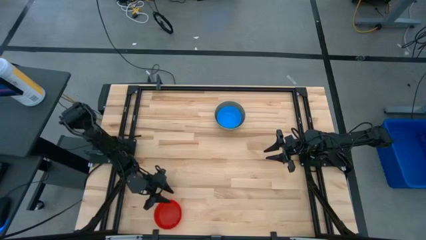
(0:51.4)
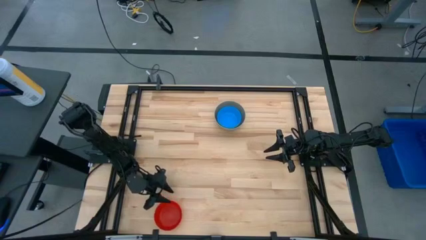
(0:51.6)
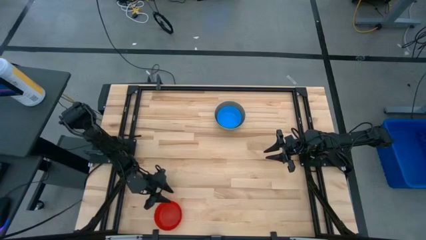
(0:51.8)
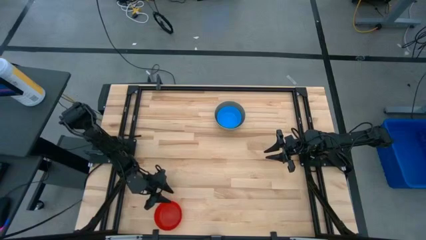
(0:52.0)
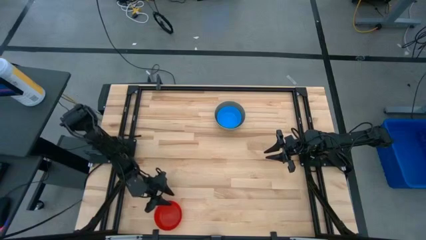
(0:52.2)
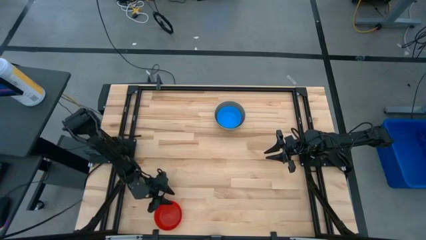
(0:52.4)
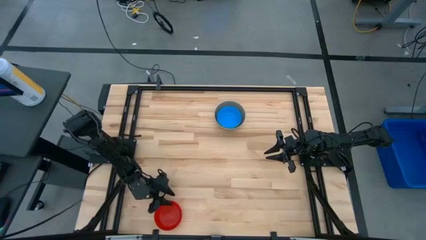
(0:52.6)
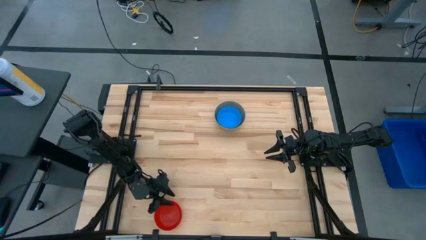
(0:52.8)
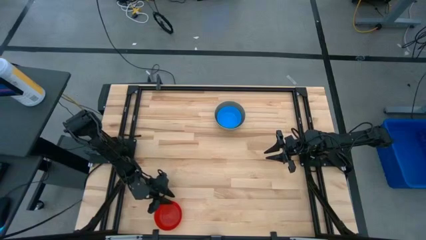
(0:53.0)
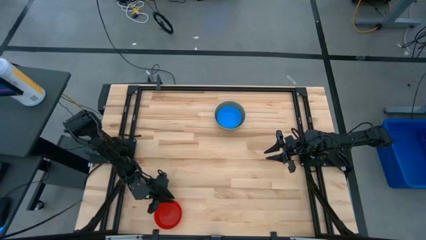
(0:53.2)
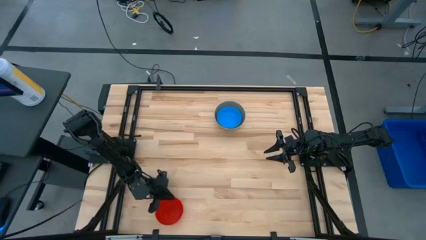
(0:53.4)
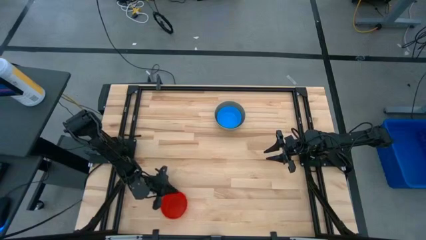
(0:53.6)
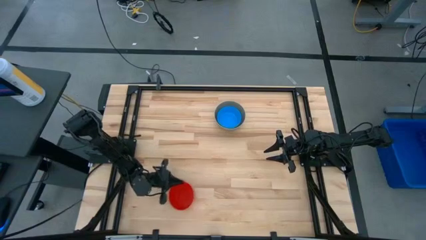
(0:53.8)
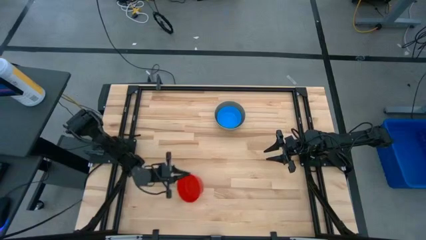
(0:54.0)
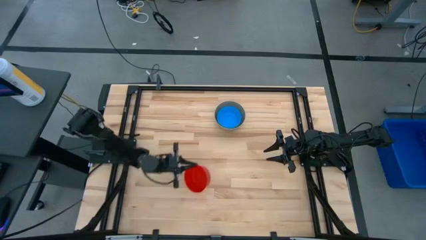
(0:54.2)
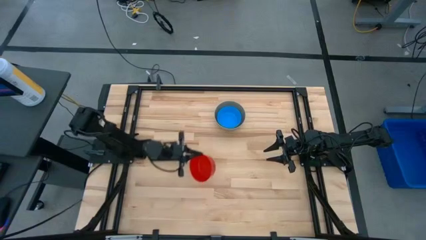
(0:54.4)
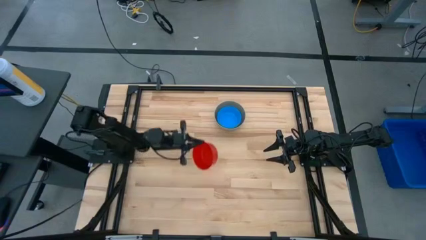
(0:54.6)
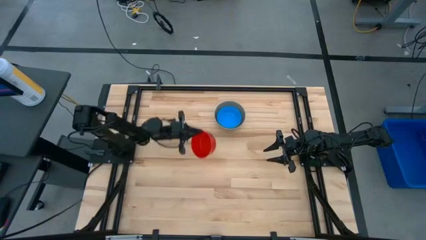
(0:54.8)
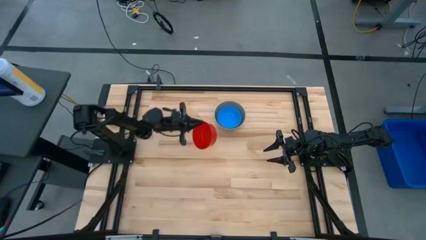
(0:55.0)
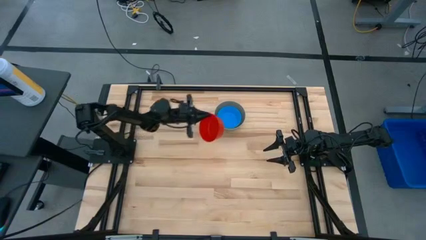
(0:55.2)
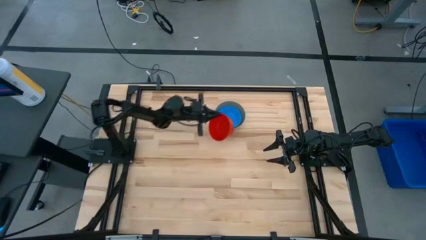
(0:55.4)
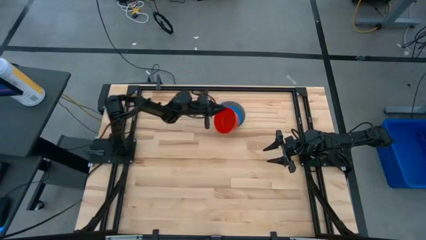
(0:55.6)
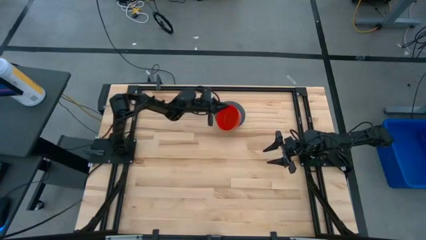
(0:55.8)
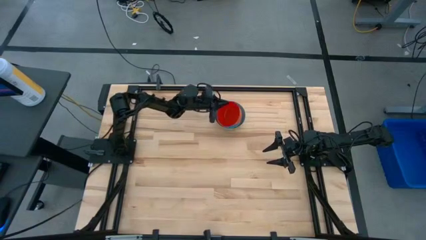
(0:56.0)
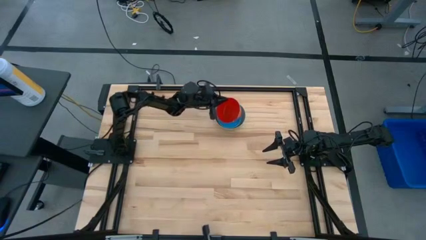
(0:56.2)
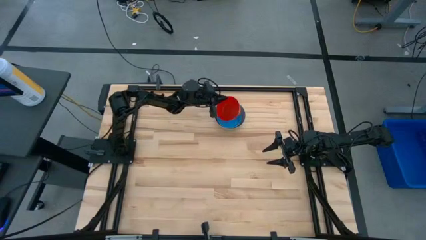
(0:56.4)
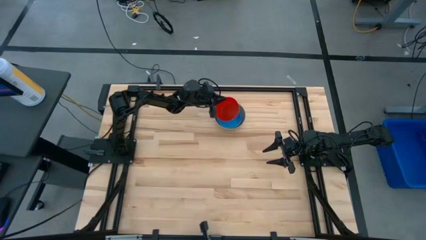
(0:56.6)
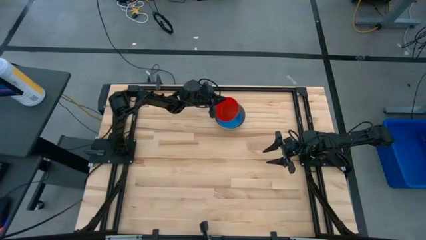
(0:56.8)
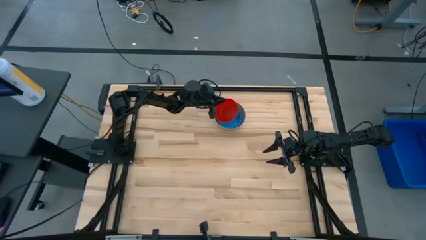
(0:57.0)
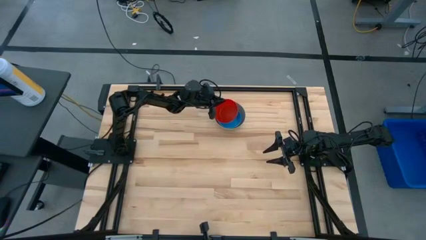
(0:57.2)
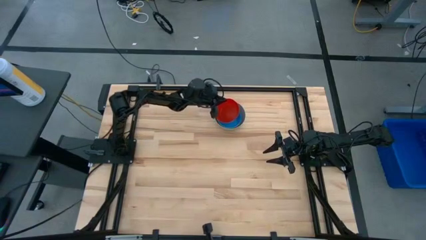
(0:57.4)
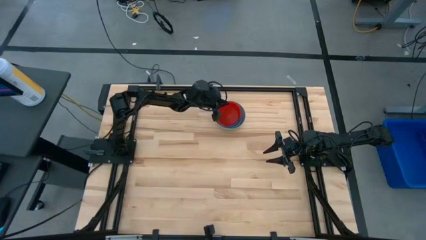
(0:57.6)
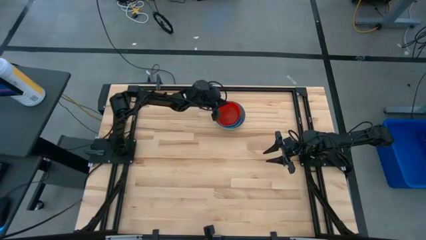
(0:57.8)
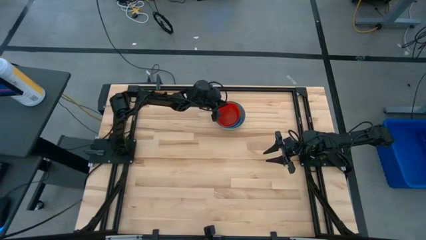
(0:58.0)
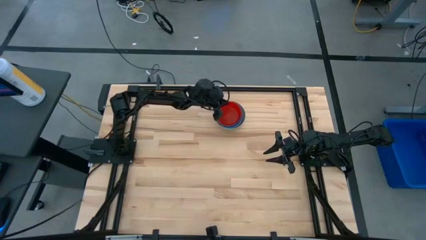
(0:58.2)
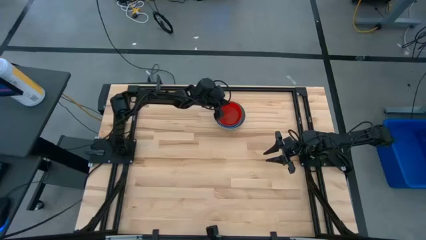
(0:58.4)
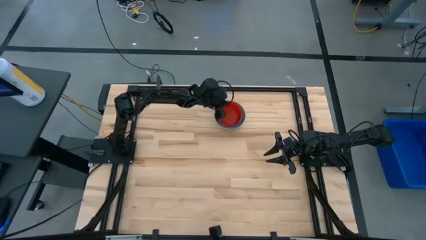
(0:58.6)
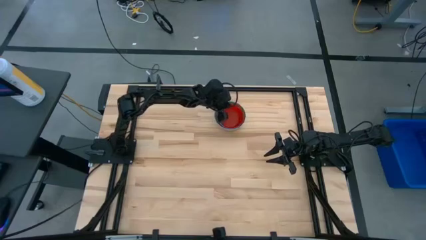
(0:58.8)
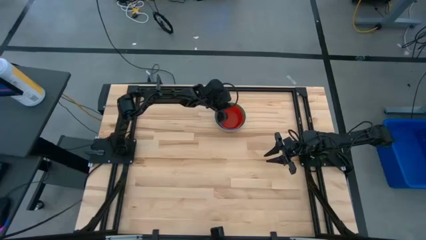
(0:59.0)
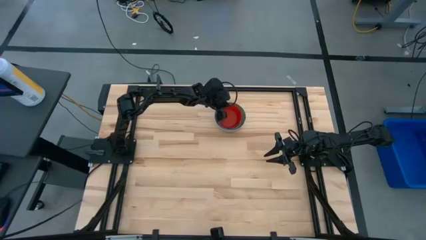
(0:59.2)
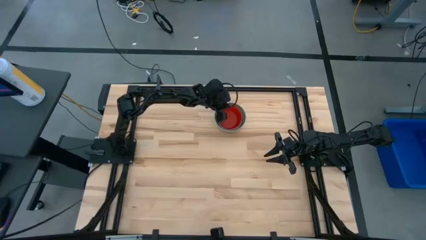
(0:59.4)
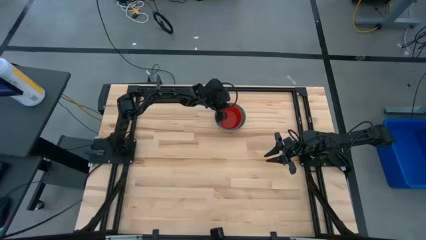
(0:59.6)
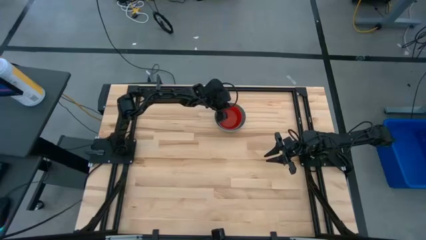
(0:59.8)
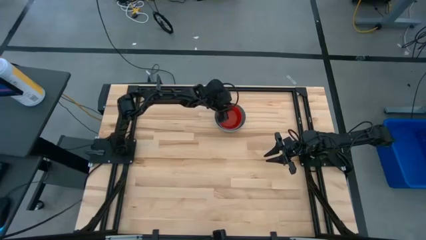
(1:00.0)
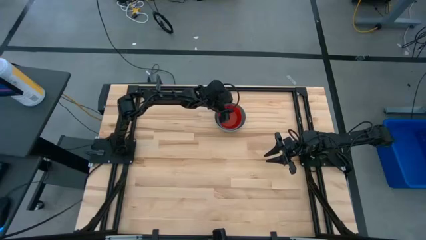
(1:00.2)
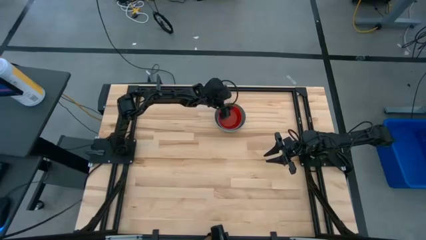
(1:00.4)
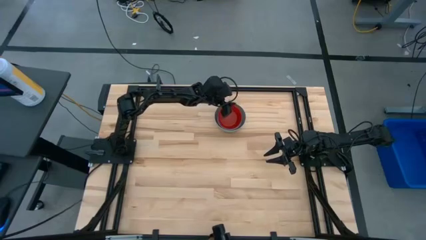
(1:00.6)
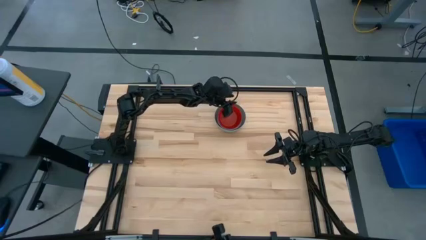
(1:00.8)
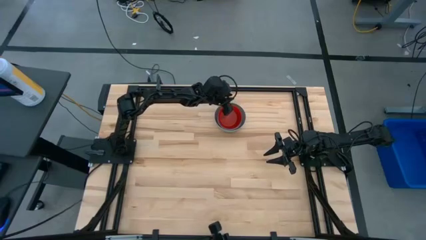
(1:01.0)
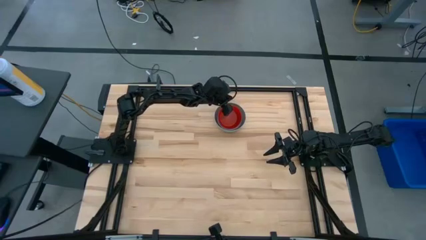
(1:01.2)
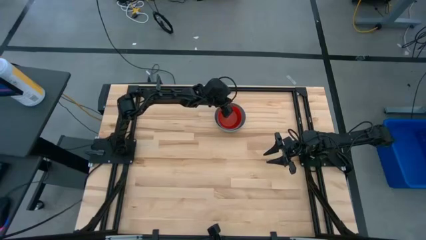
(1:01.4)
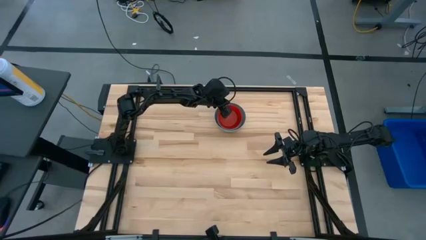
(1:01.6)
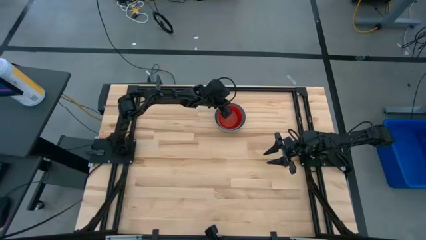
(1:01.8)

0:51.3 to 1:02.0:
Stack the red bowl on the light blue bowl

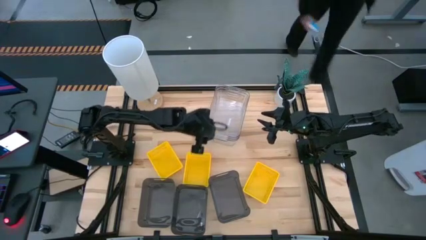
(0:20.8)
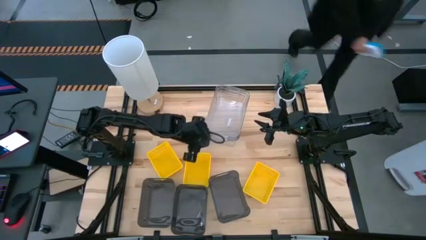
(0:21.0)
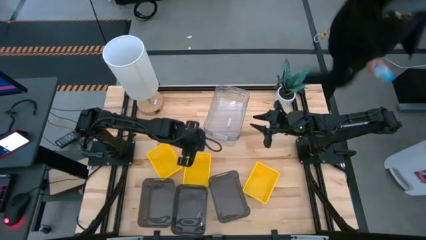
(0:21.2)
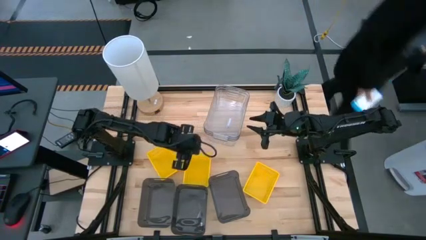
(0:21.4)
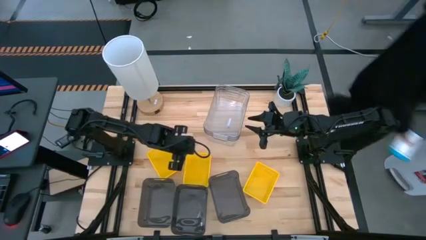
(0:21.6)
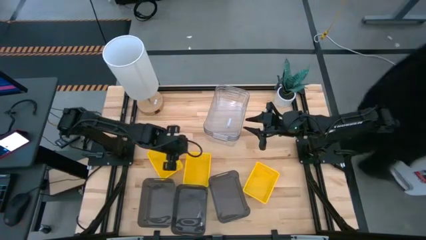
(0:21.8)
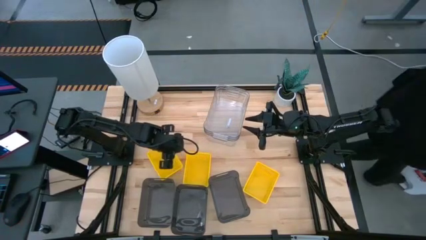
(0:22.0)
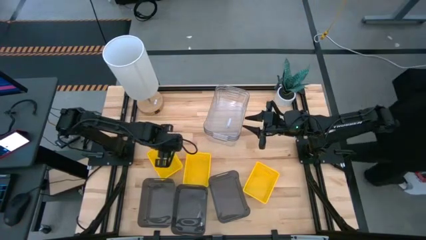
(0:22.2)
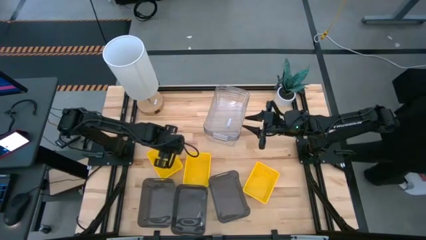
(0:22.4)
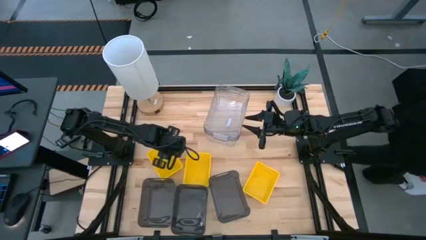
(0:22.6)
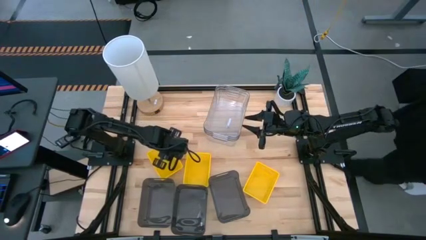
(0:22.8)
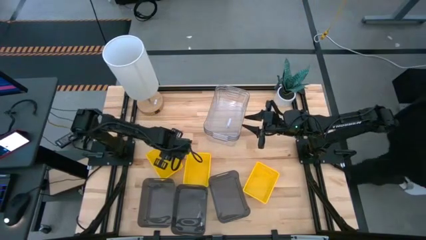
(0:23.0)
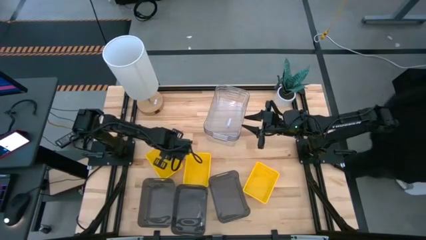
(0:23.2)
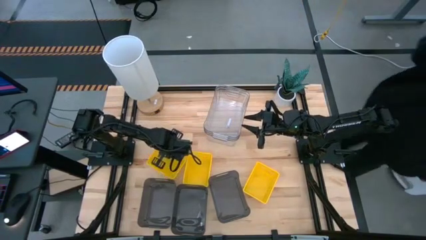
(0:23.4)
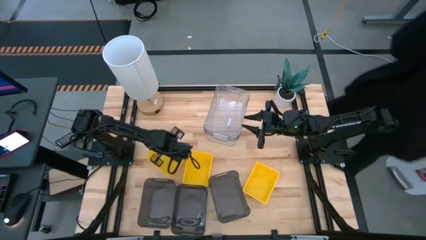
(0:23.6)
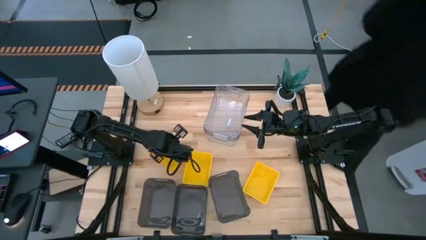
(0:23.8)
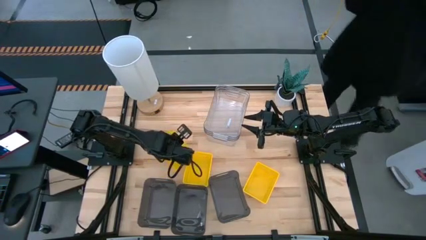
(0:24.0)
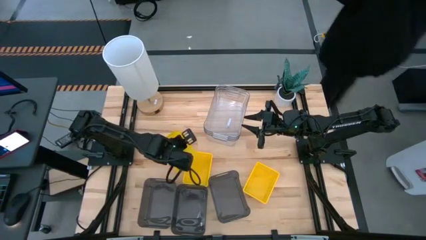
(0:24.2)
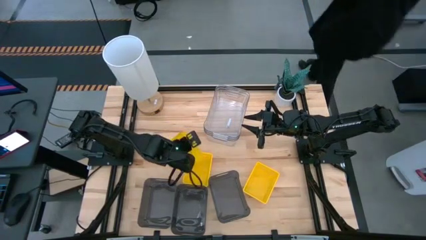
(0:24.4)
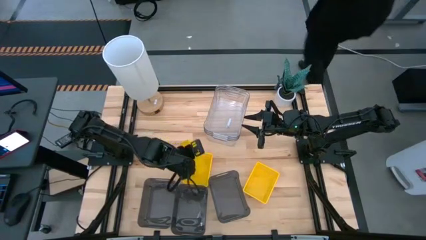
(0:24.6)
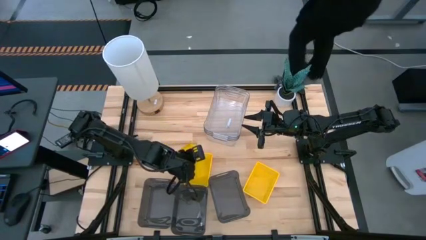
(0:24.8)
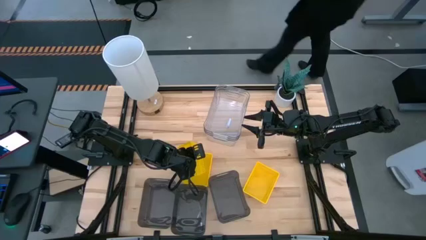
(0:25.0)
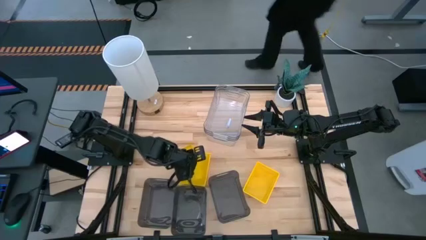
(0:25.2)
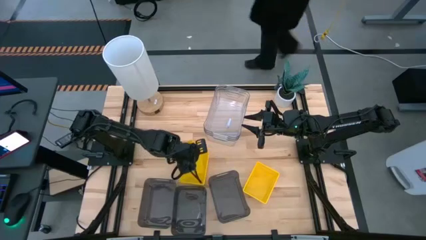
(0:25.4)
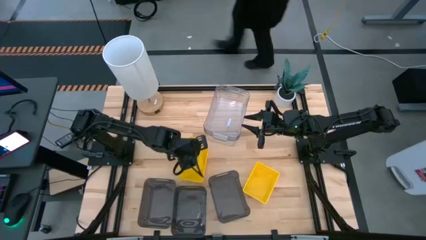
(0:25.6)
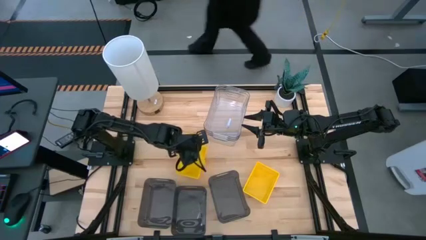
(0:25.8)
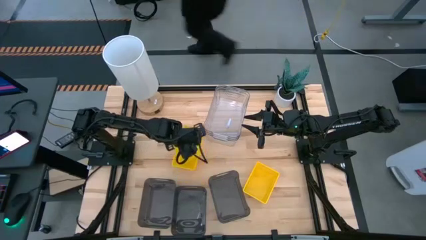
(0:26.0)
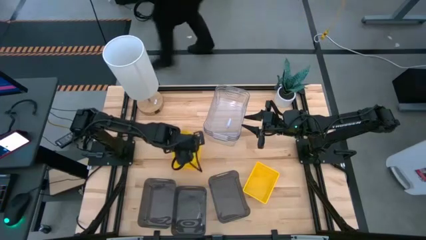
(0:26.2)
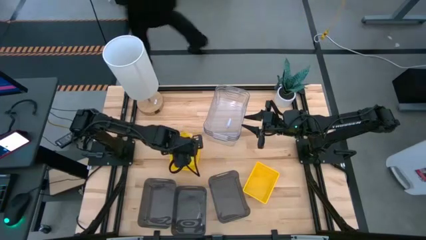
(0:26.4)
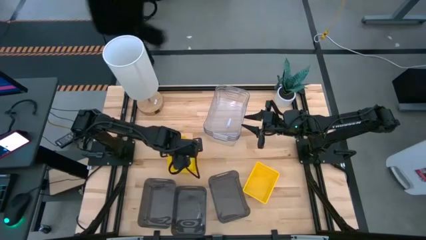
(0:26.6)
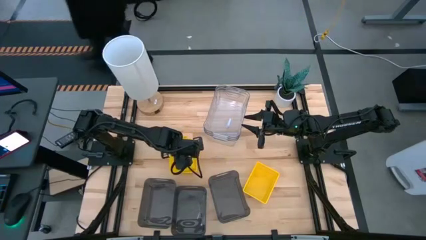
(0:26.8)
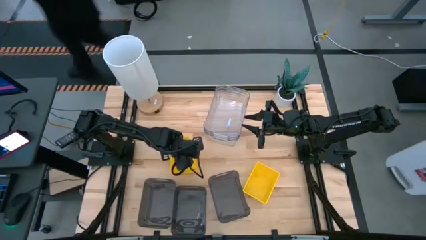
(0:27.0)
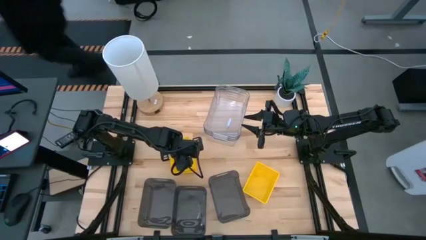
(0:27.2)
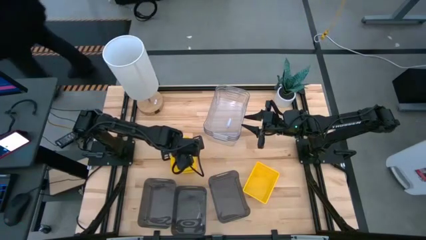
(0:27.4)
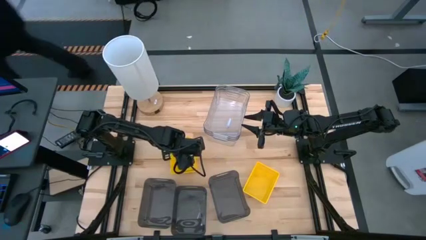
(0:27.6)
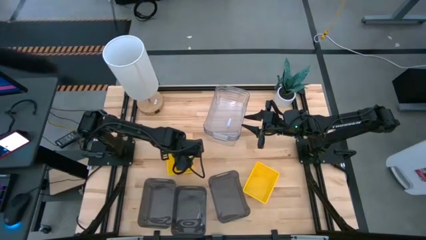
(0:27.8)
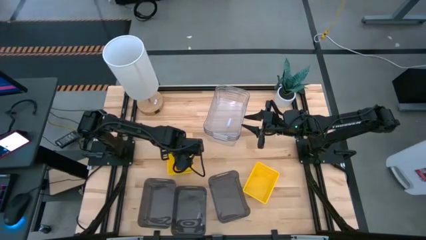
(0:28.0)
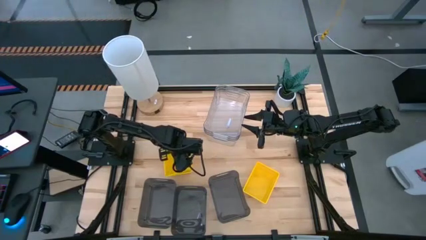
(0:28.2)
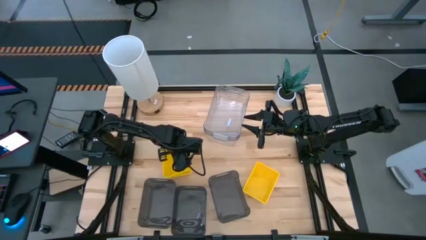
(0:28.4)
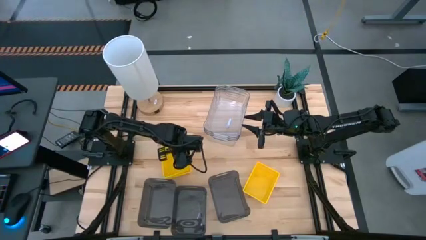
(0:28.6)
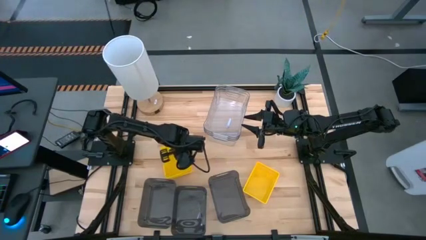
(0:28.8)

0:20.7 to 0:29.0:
Stack the left yellow bin into the middle yellow bin
